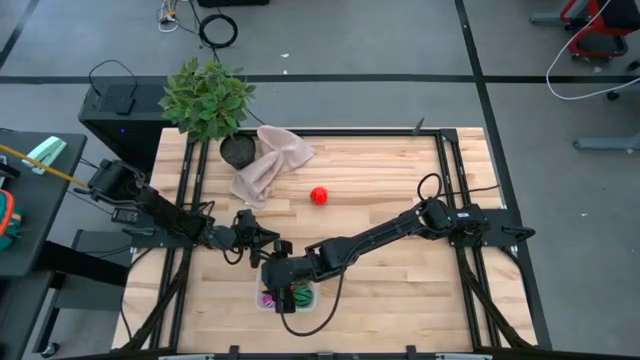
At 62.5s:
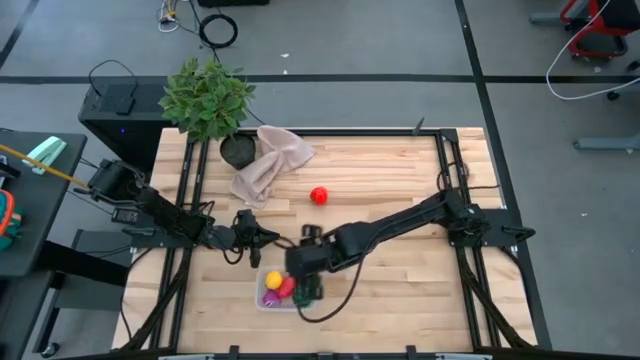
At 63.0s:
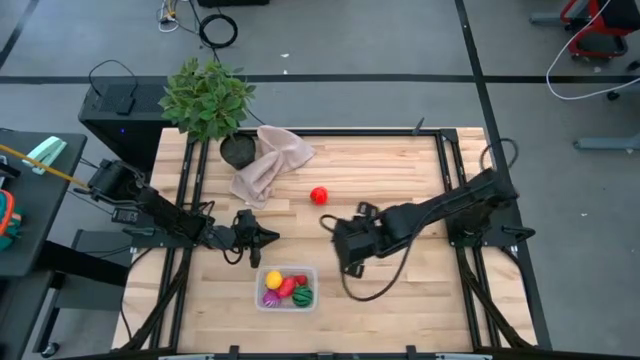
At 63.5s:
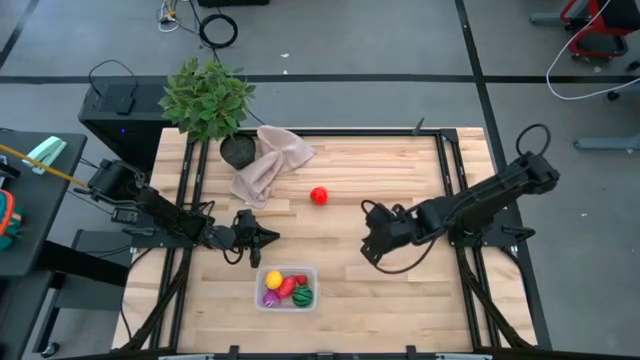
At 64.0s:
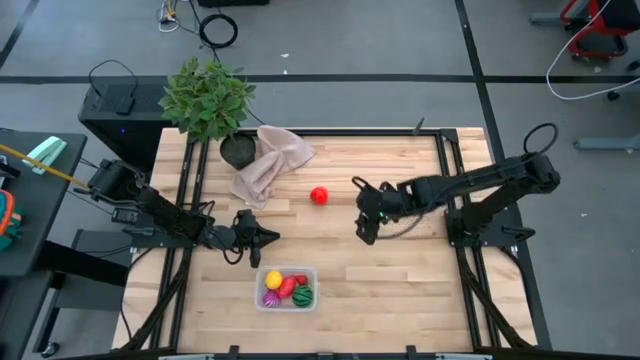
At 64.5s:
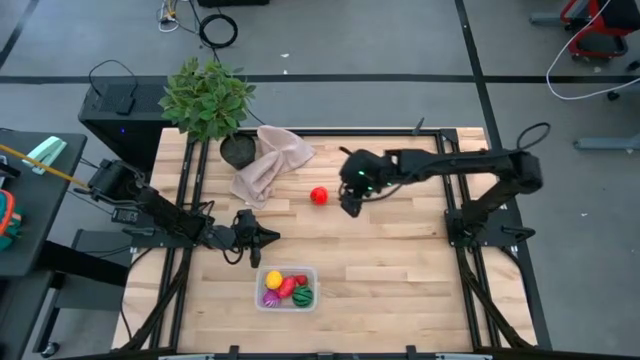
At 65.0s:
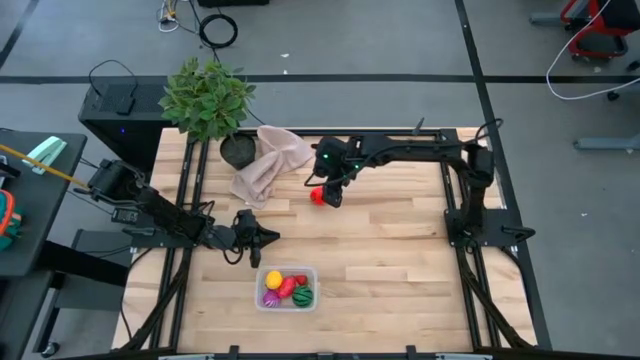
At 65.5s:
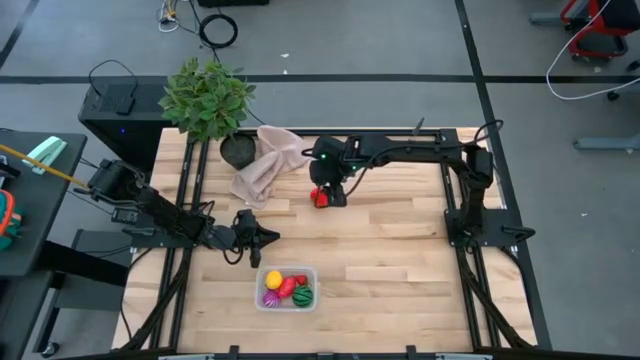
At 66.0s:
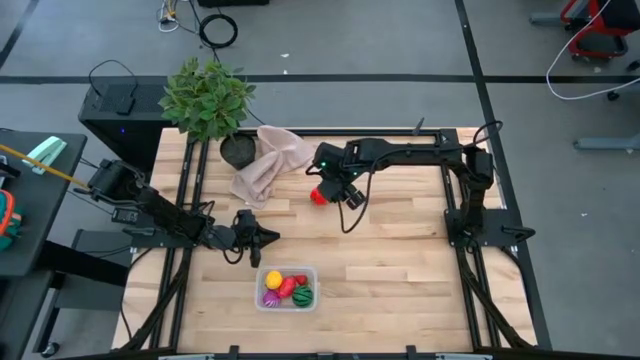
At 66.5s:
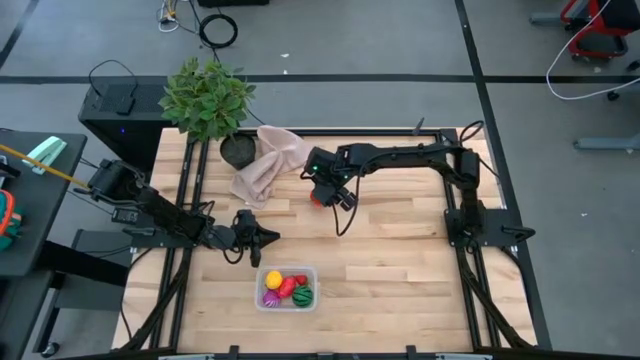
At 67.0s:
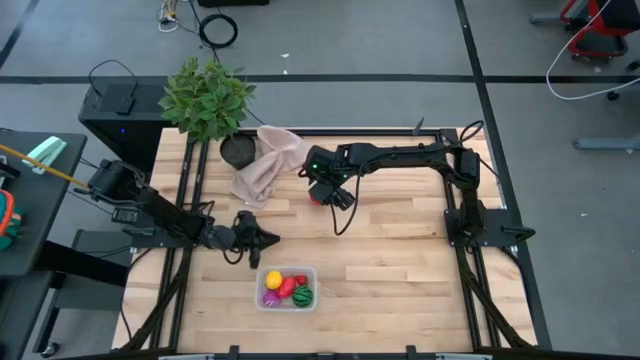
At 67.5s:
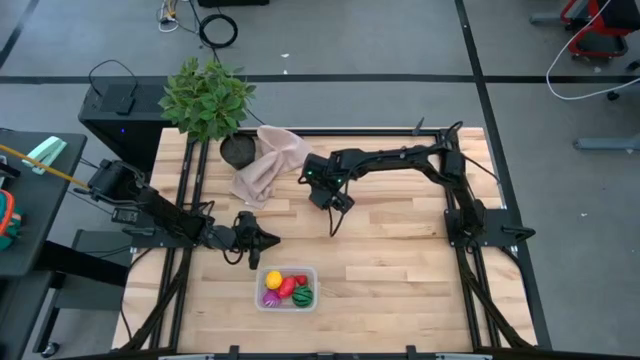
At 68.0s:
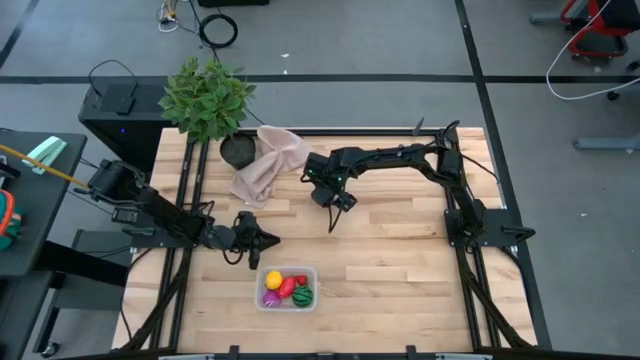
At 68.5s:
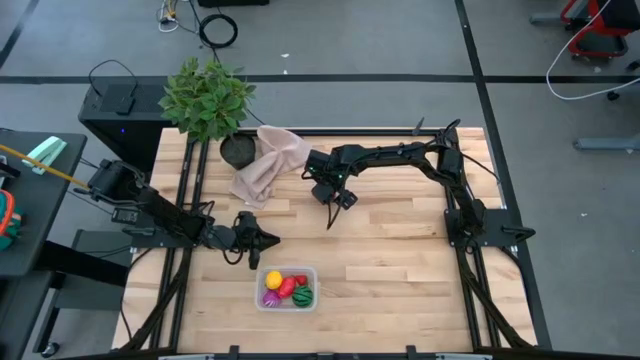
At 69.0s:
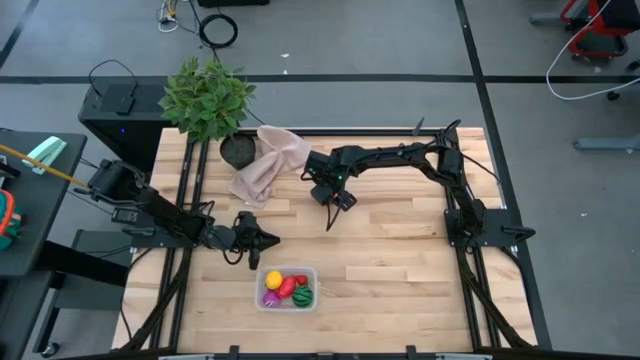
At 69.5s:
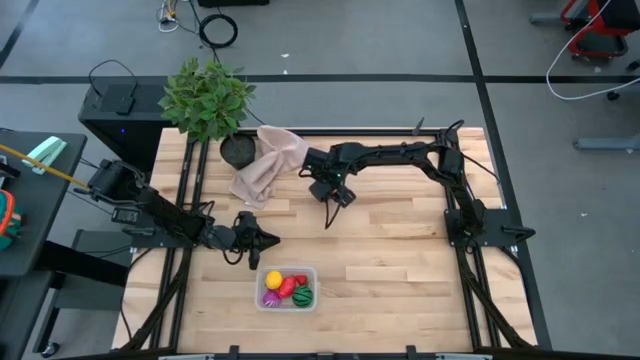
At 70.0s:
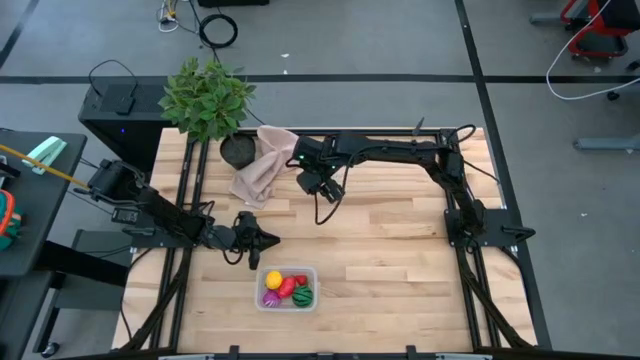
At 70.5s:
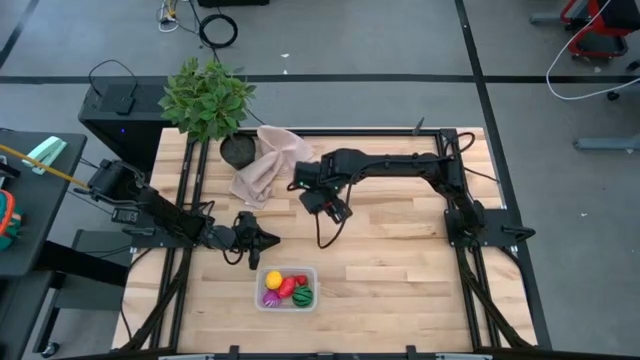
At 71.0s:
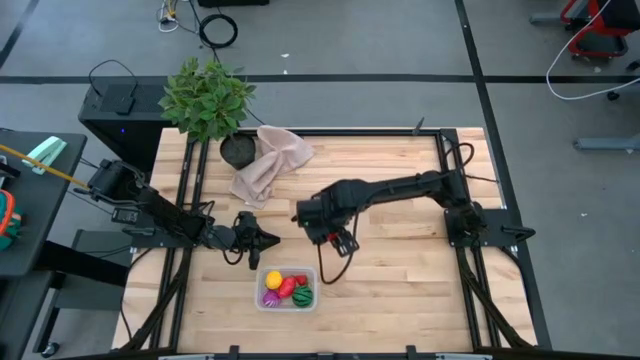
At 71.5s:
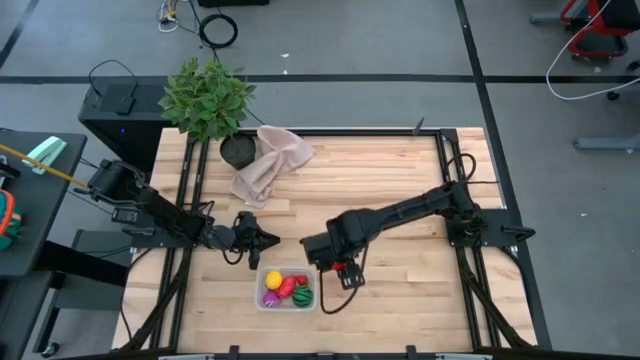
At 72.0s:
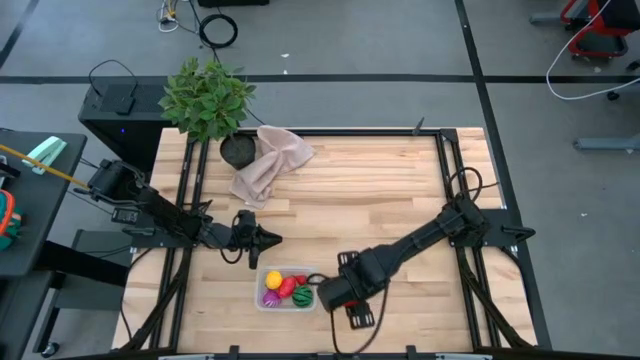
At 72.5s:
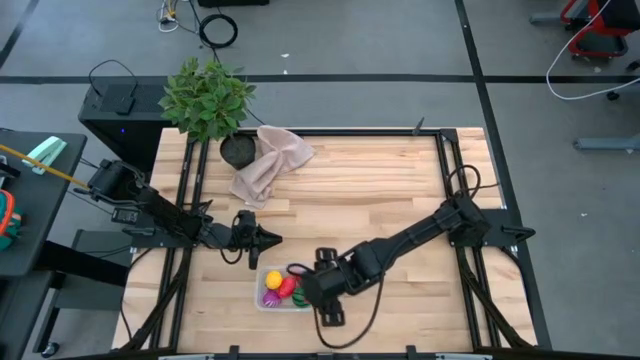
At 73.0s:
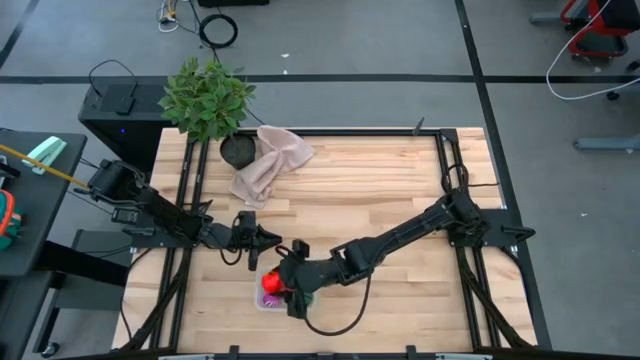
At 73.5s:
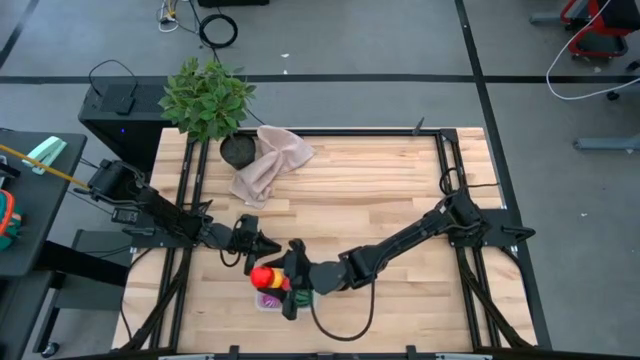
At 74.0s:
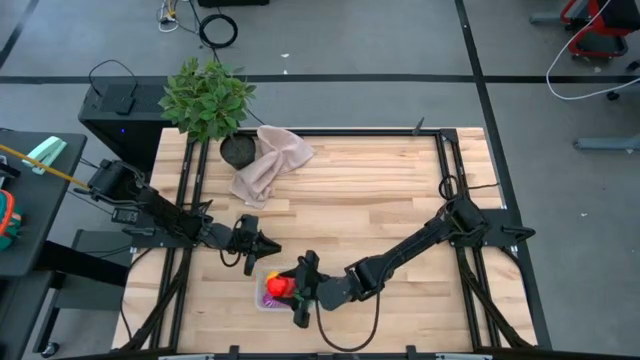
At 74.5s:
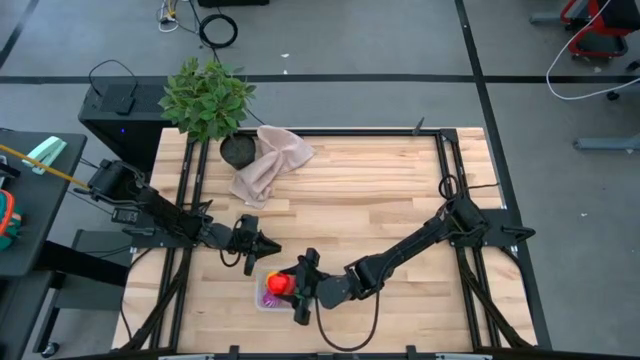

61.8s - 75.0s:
Task: Pick and placing Produce into tupperware
Put the apple into the transparent bin

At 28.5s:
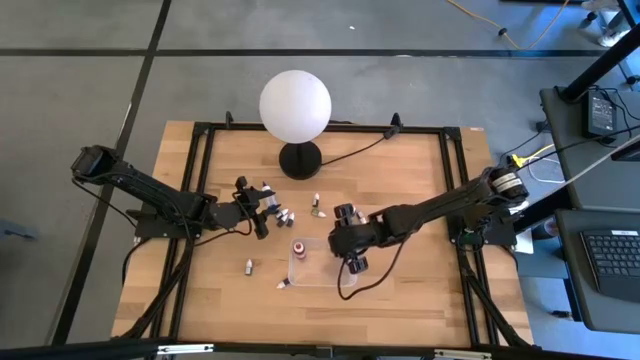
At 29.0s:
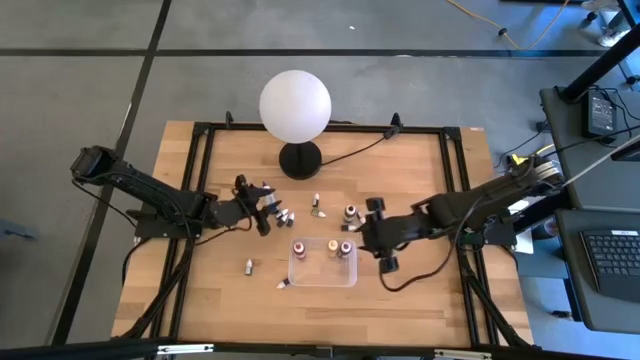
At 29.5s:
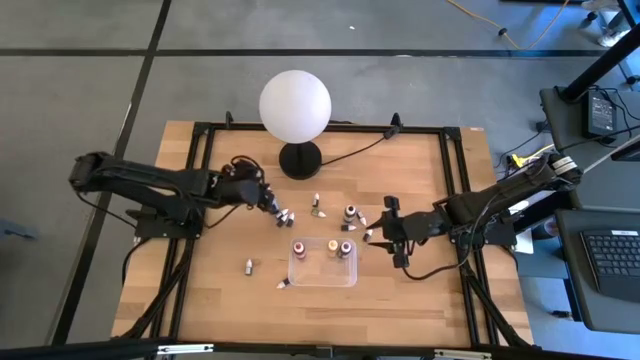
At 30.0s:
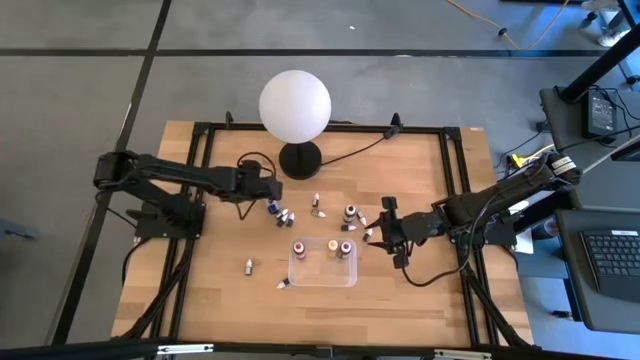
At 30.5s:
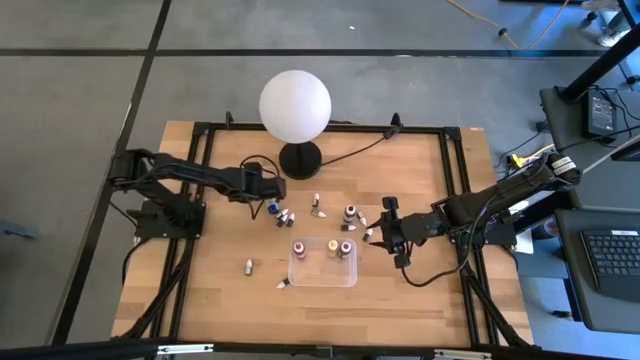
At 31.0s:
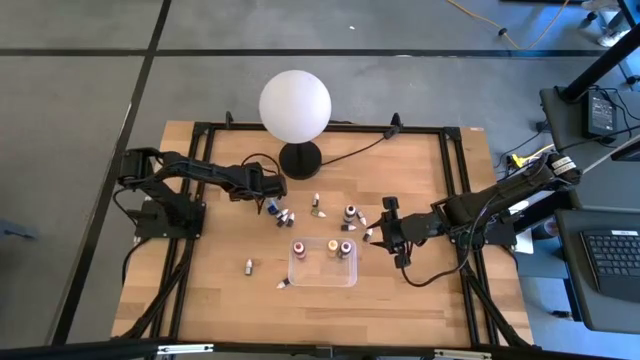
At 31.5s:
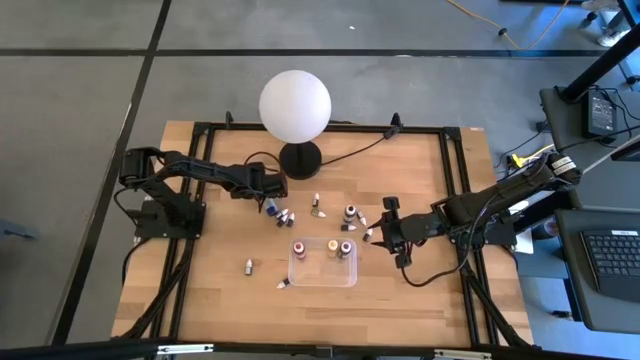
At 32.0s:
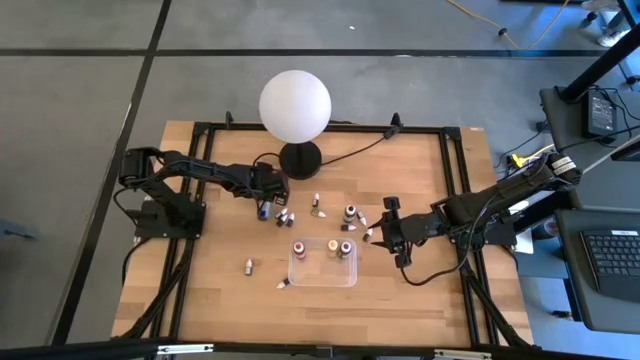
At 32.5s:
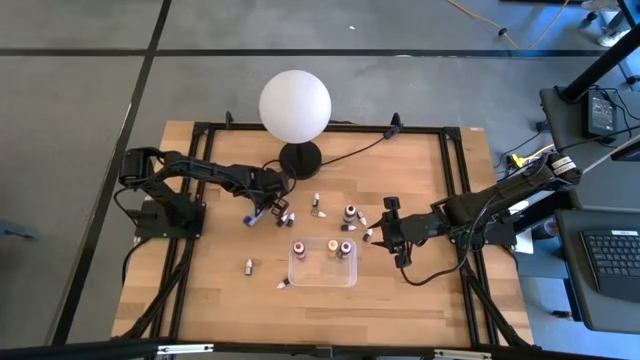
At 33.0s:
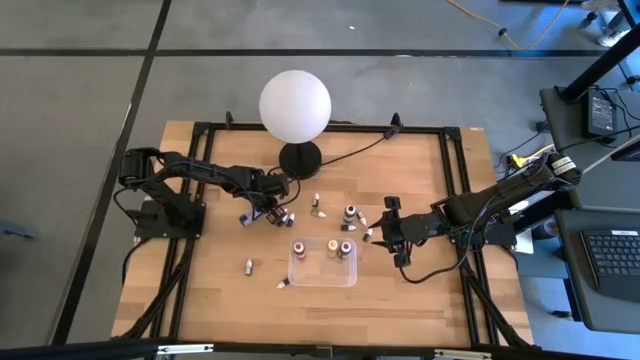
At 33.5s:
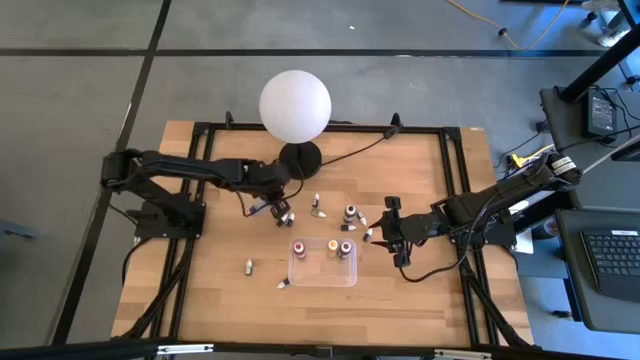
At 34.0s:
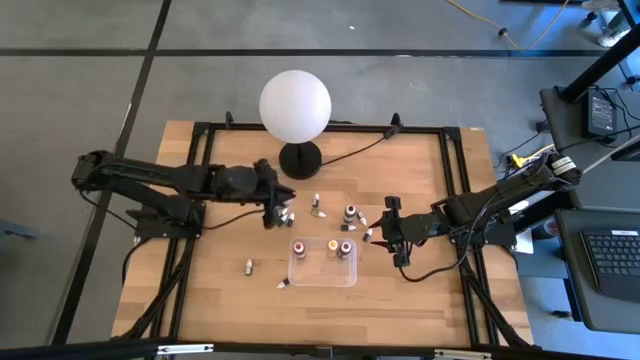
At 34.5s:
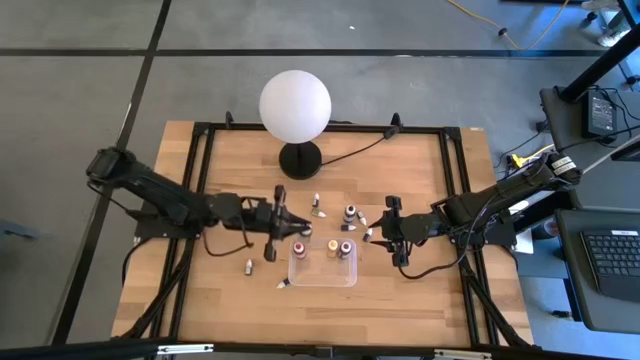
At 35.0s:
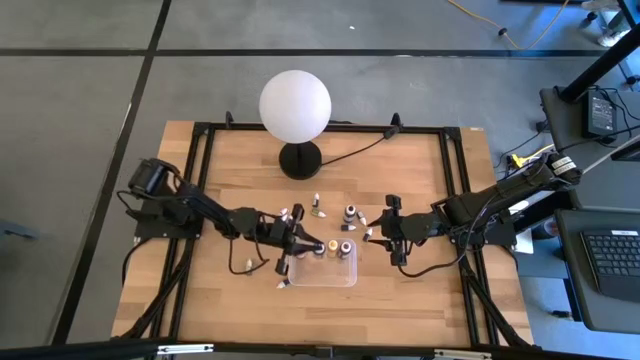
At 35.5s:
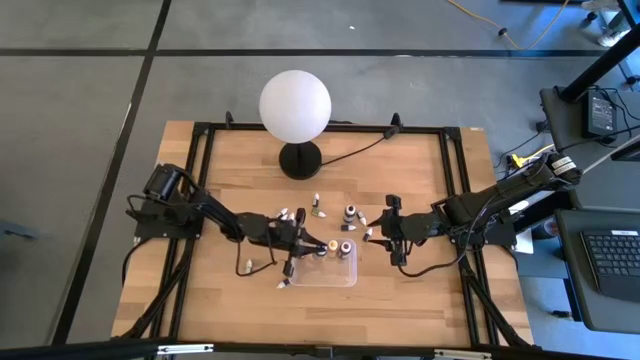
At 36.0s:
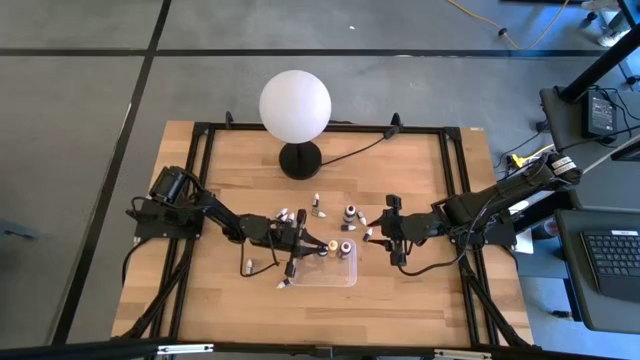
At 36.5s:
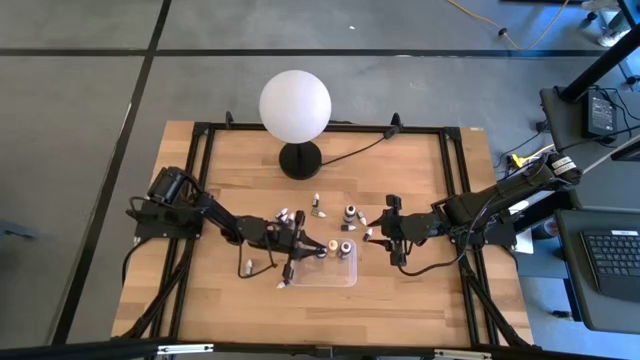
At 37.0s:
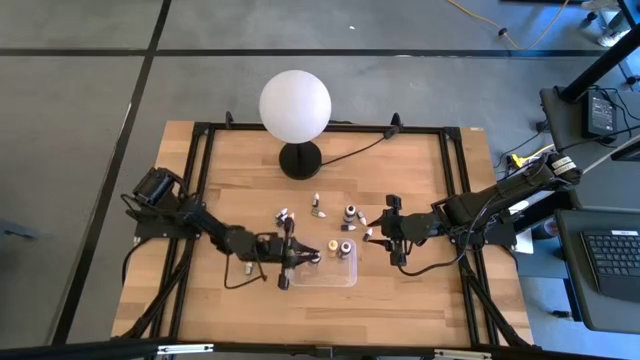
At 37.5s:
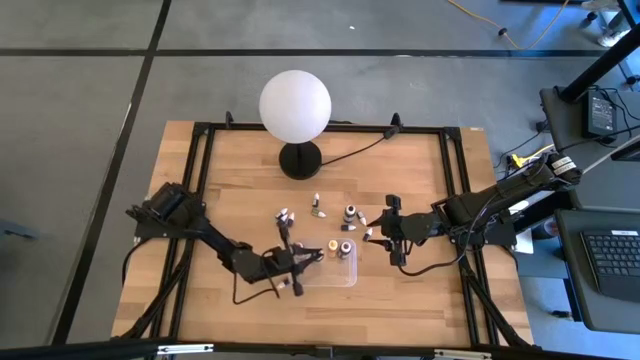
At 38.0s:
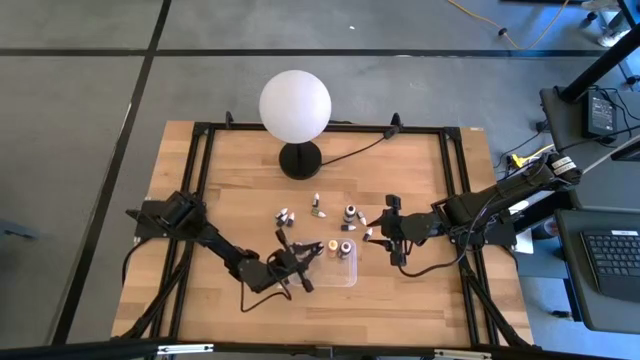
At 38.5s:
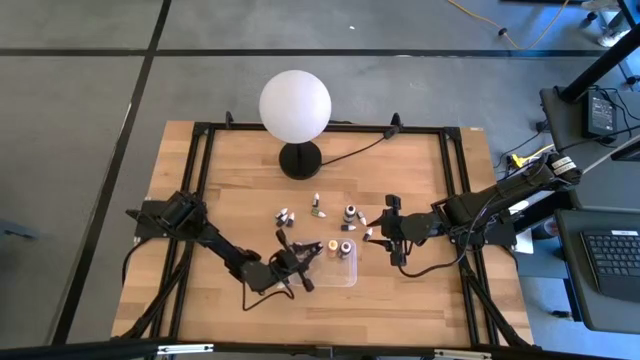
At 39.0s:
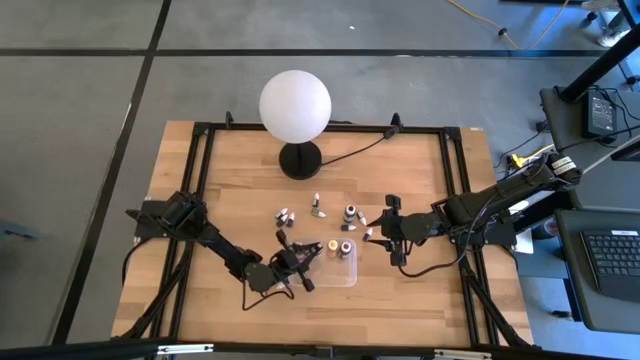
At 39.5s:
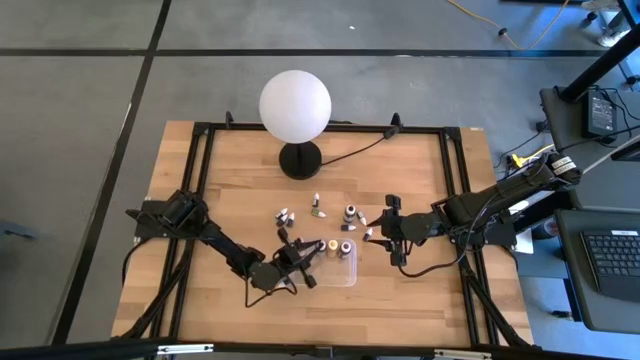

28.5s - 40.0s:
Task: Pick & Place food coloring
Put the large blue food coloring bottle into the transparent bin
